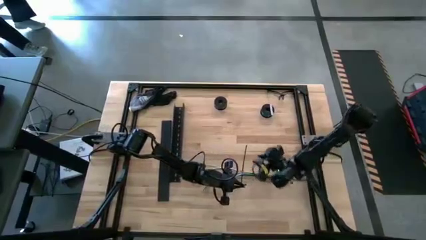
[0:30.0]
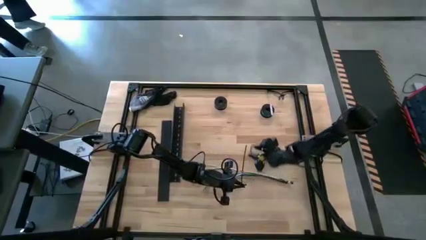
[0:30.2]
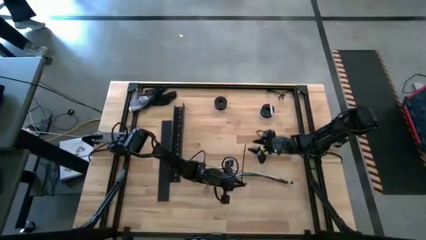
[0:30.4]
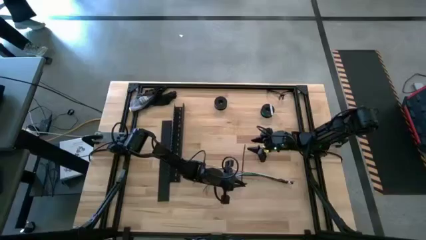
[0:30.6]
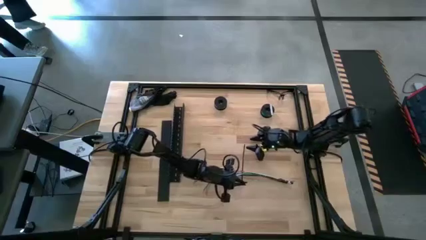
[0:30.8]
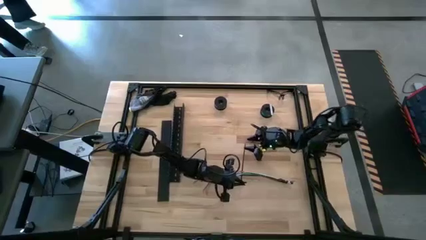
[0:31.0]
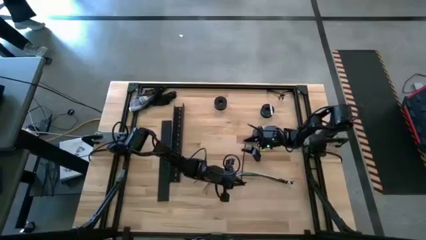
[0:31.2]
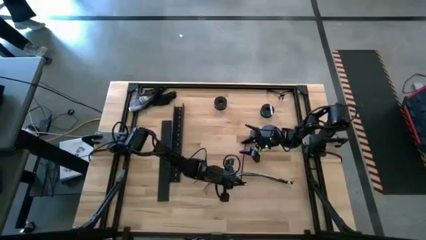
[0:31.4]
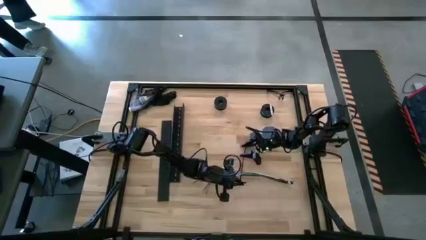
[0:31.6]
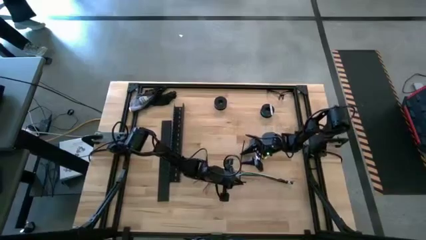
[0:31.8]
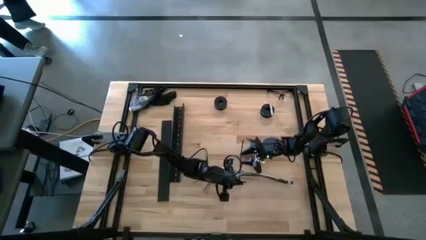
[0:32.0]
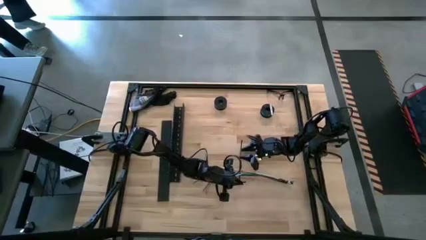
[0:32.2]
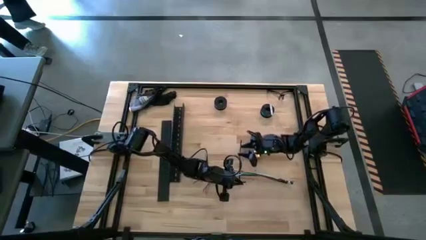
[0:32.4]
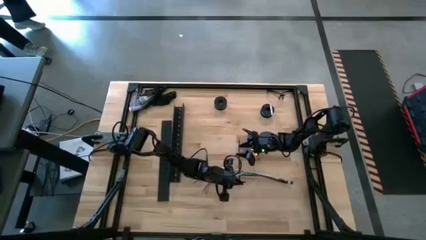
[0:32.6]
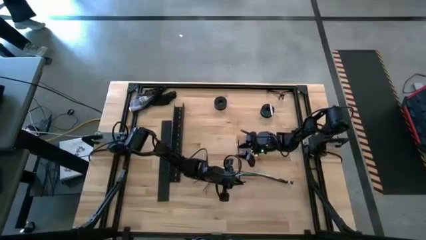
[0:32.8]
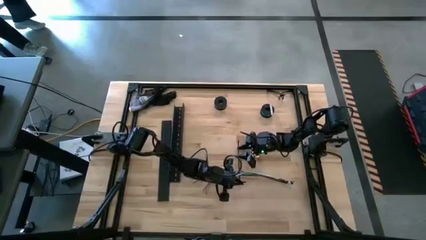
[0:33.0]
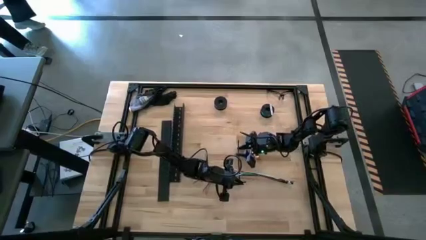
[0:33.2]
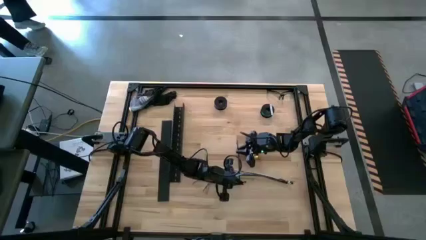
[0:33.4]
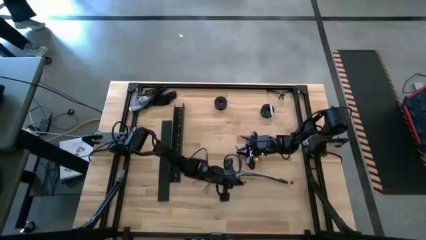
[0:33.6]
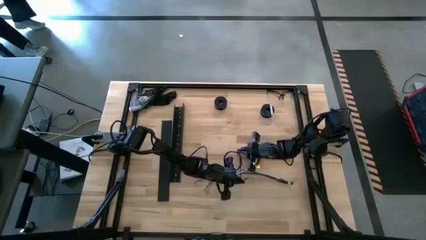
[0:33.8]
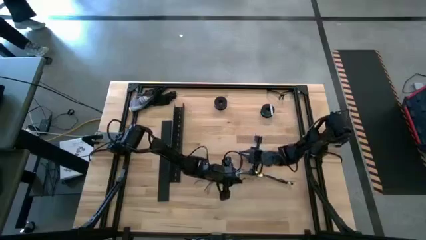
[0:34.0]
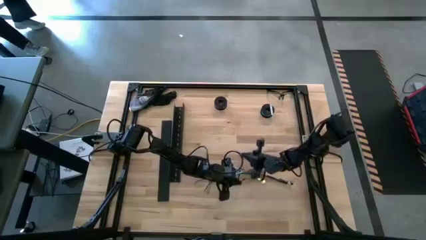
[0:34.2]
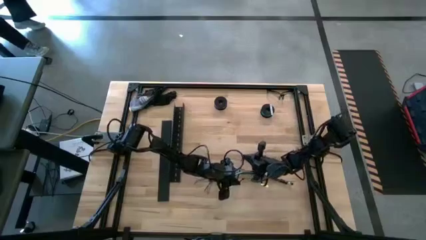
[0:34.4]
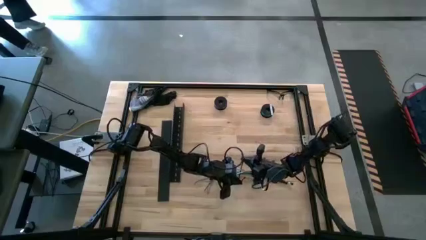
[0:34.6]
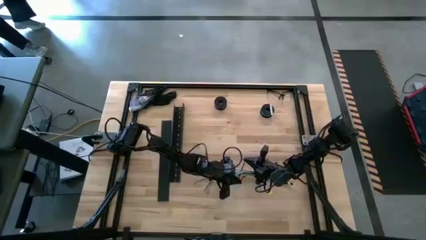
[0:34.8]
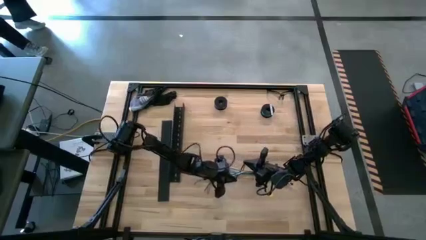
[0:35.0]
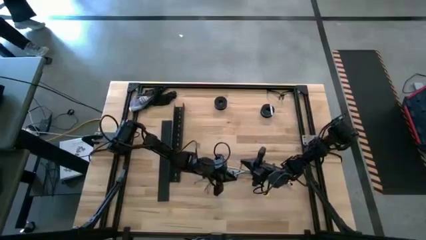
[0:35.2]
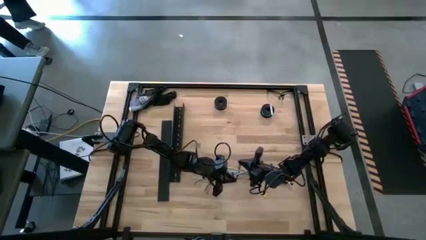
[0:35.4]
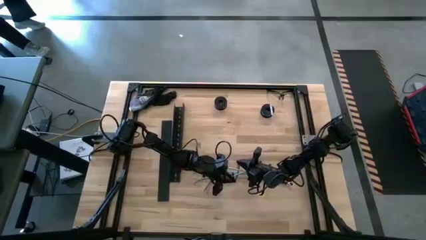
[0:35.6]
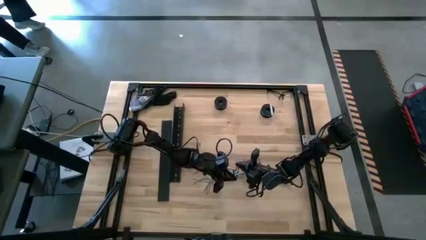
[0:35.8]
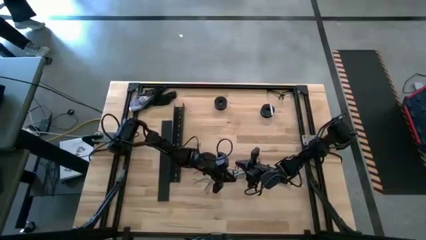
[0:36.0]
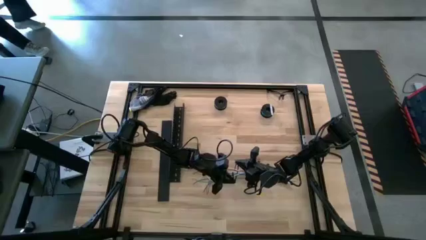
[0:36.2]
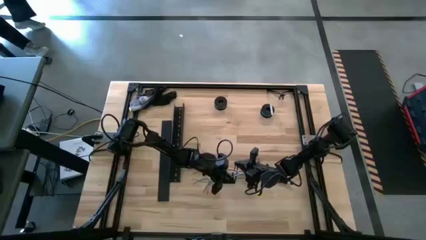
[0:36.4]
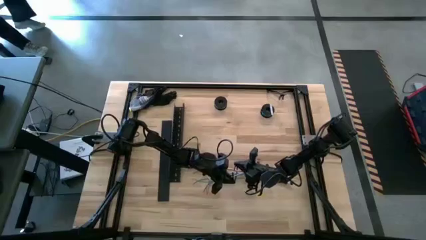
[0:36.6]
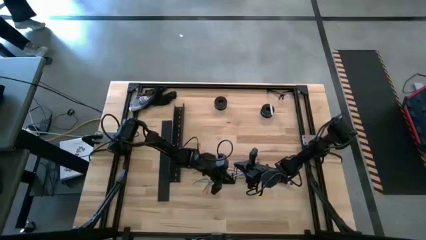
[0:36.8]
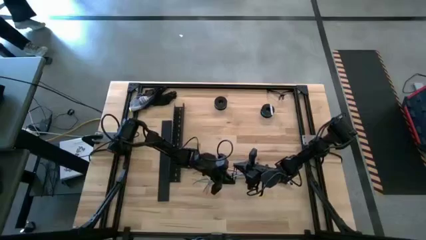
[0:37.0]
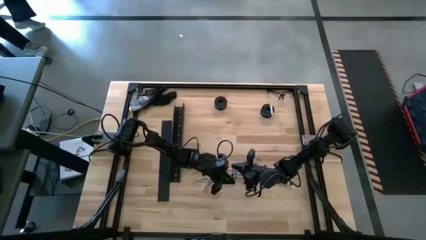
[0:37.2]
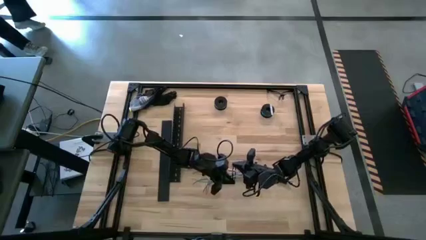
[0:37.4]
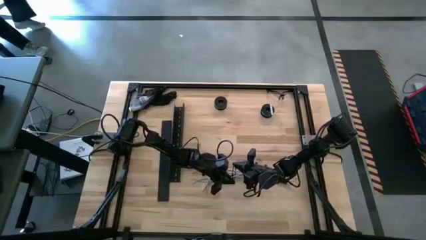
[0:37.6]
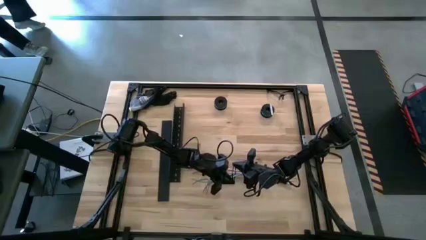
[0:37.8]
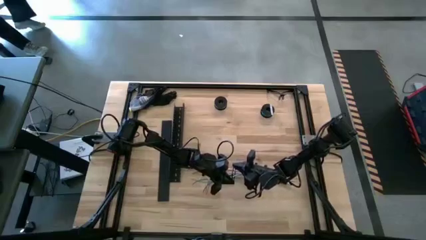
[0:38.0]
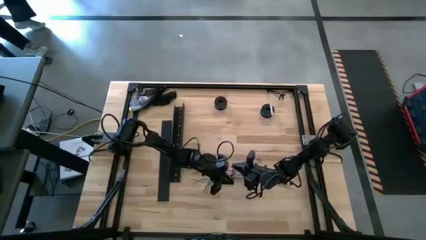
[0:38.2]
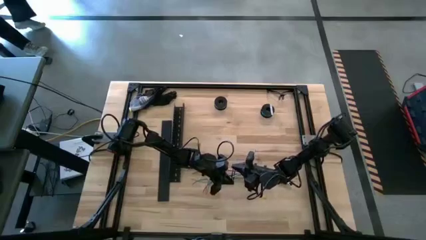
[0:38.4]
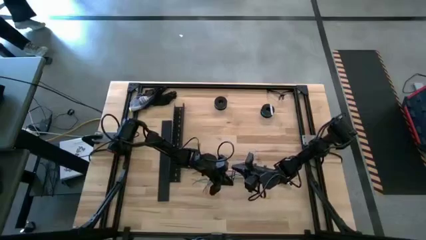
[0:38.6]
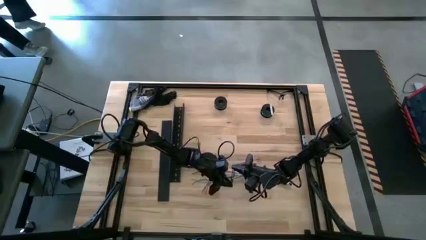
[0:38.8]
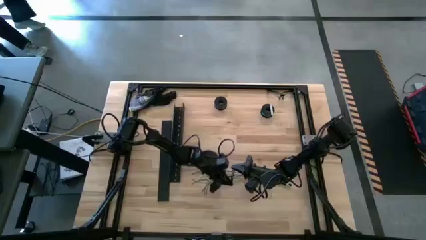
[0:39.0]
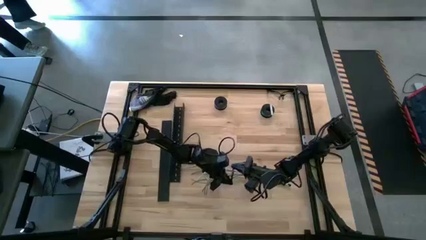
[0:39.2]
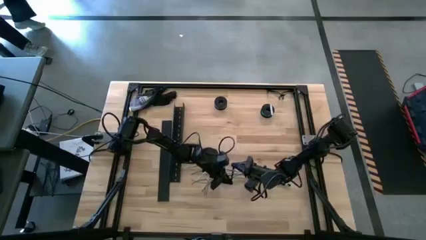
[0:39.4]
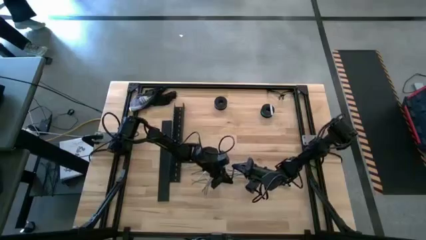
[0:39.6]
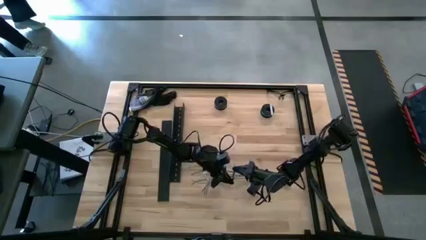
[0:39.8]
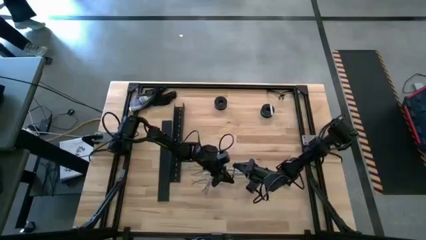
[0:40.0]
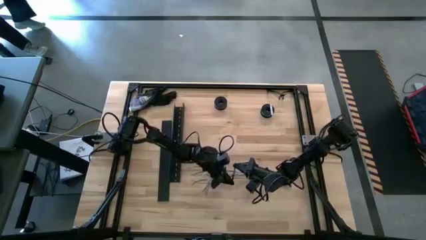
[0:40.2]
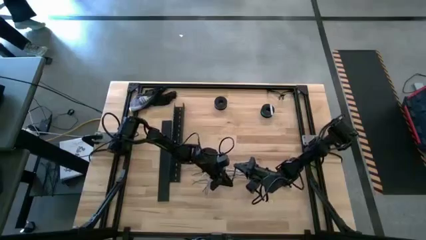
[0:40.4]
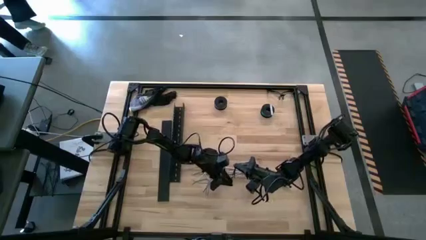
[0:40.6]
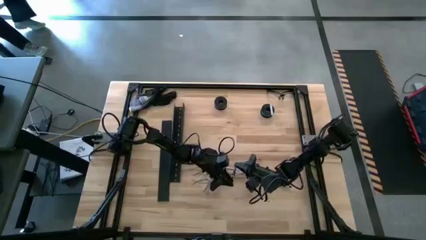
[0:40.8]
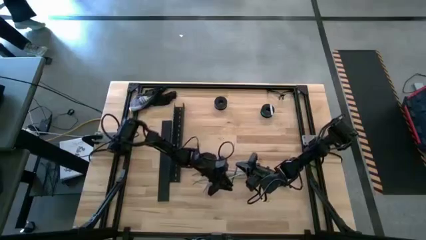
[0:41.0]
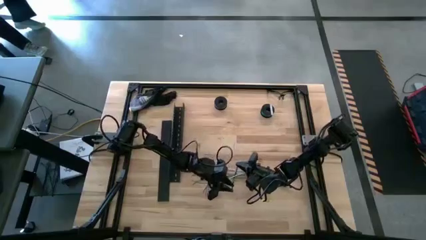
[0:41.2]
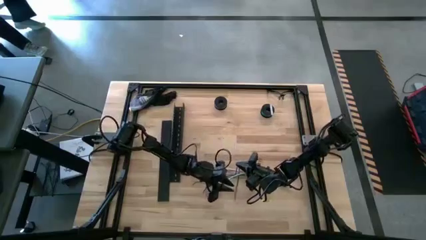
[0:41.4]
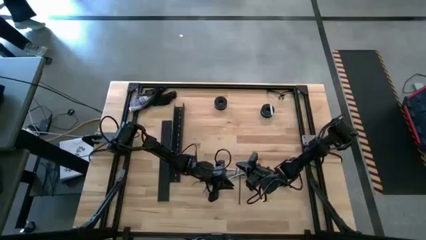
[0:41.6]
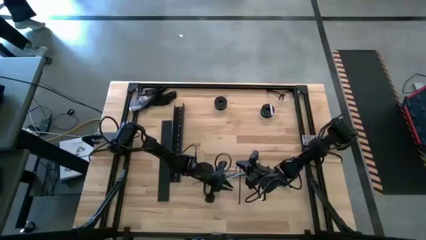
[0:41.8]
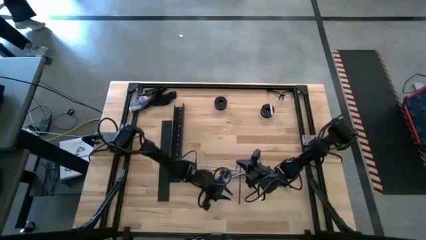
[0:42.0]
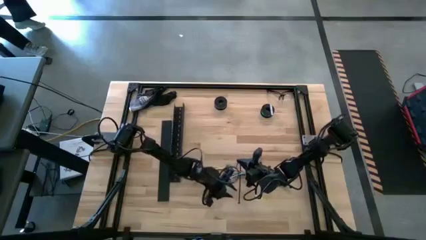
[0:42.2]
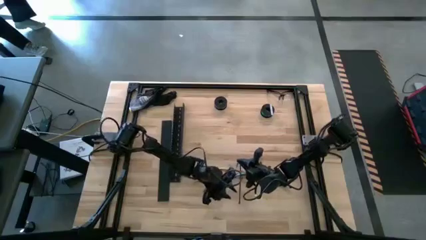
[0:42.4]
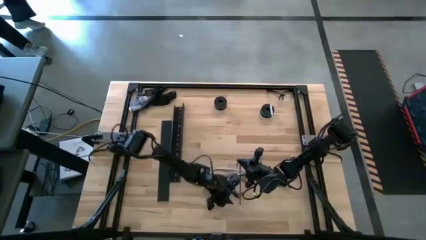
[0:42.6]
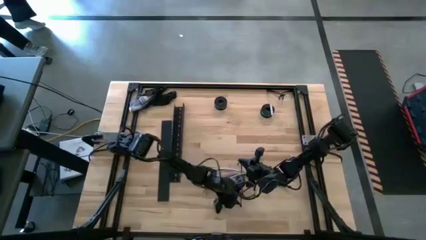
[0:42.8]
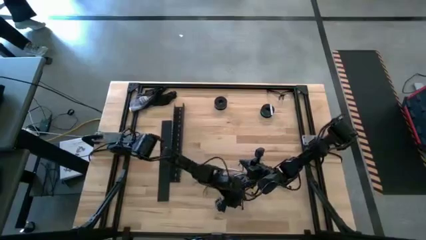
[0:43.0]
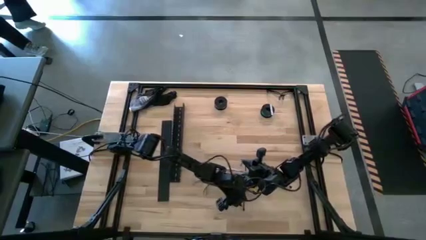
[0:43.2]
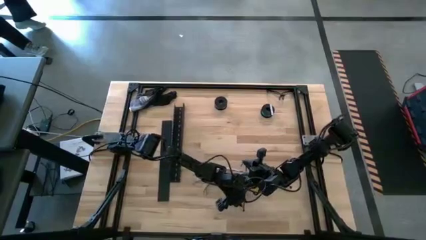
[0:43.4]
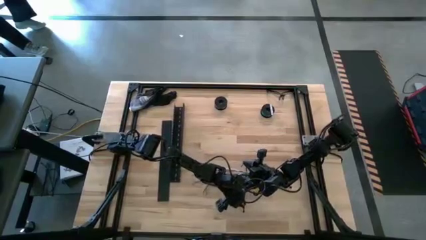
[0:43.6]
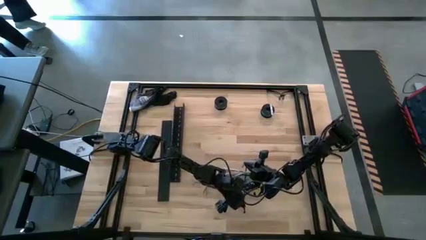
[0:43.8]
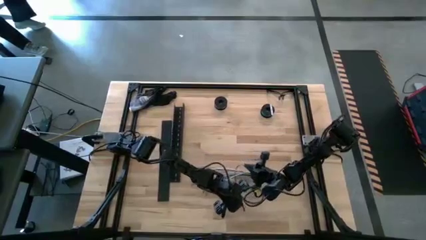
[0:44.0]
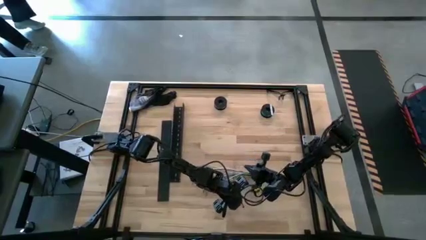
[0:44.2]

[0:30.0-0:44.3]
Task: Ziptie cables
Wrap the black zip tie on the cable
